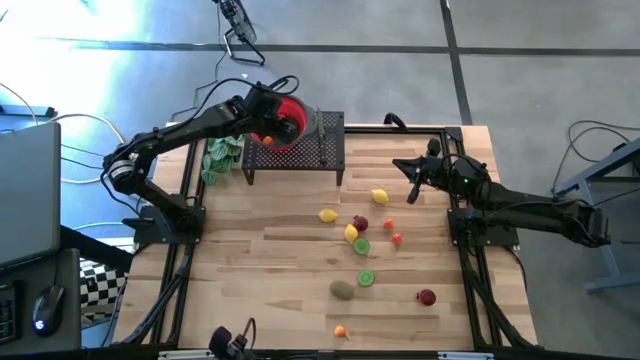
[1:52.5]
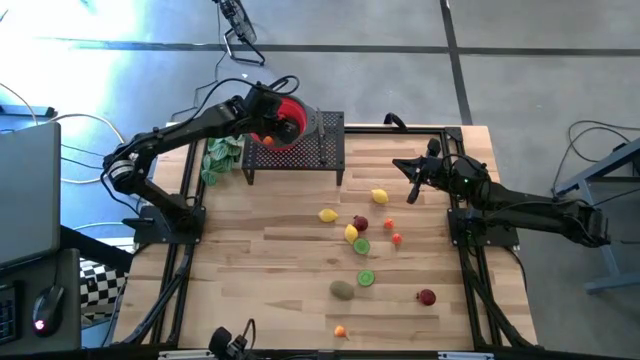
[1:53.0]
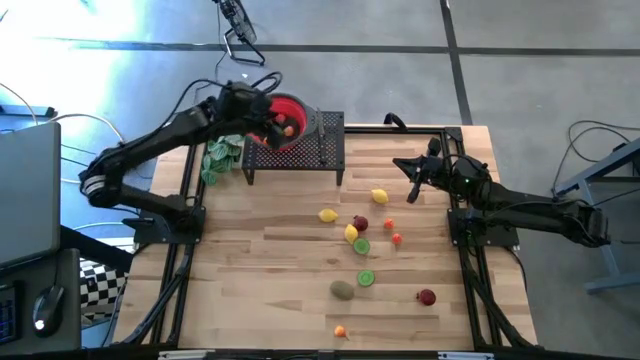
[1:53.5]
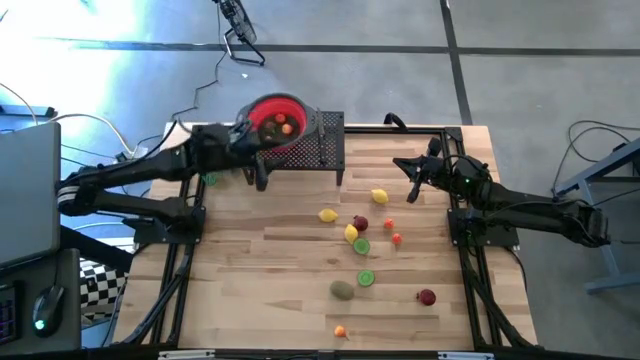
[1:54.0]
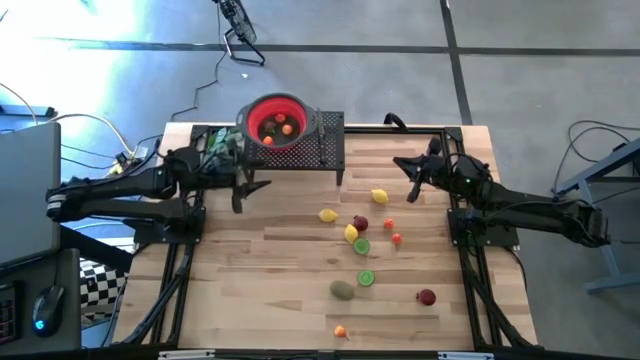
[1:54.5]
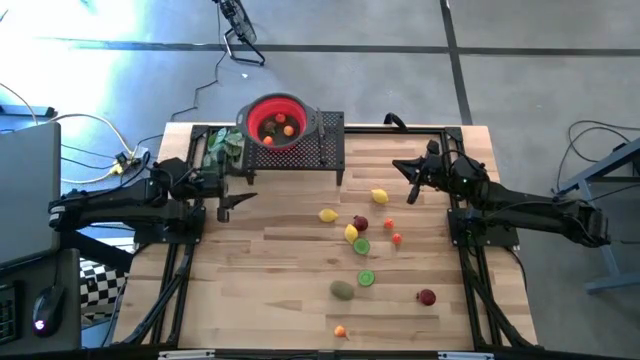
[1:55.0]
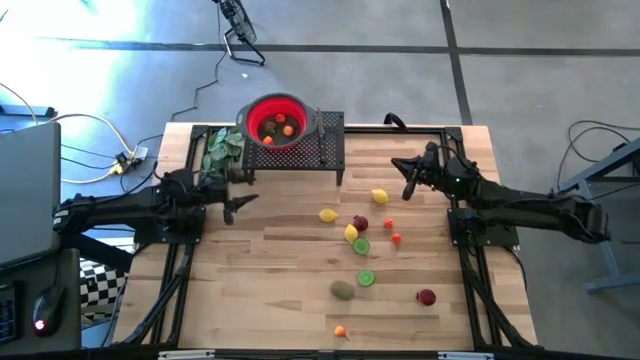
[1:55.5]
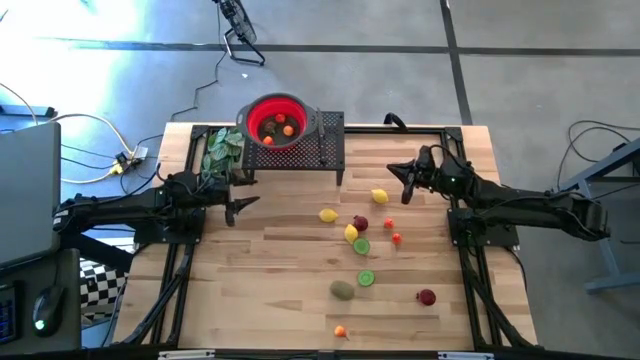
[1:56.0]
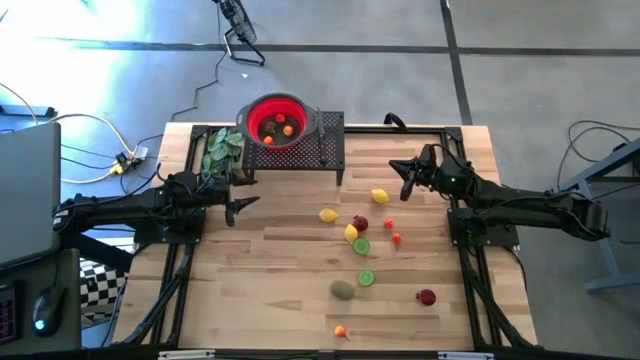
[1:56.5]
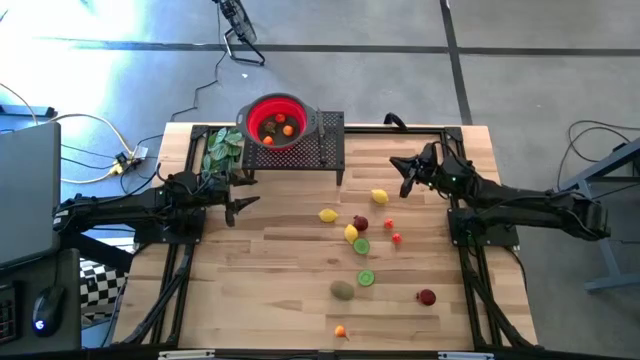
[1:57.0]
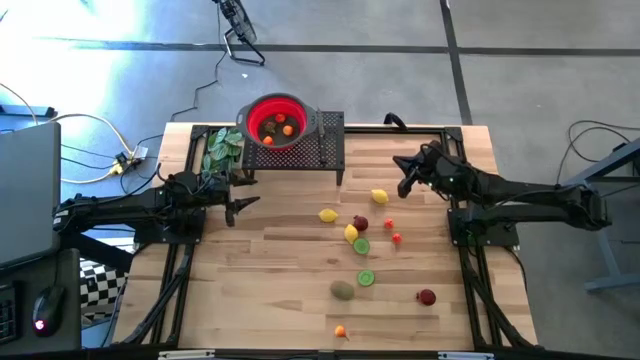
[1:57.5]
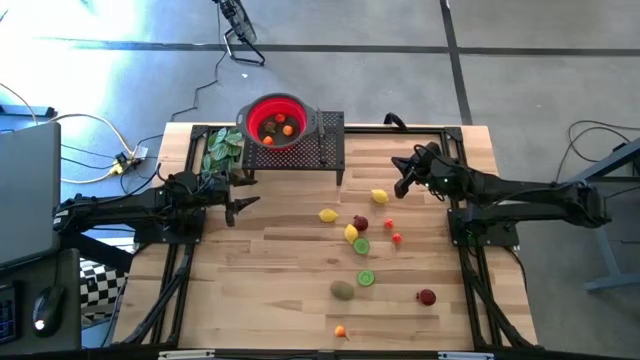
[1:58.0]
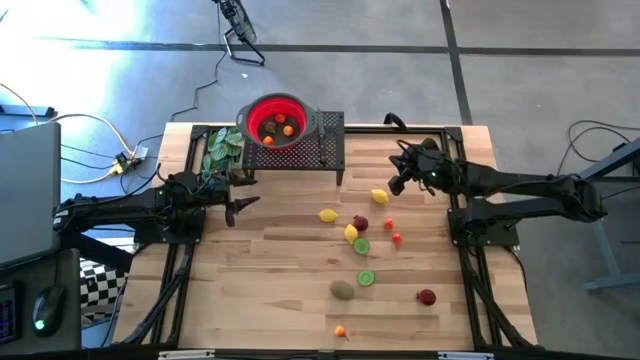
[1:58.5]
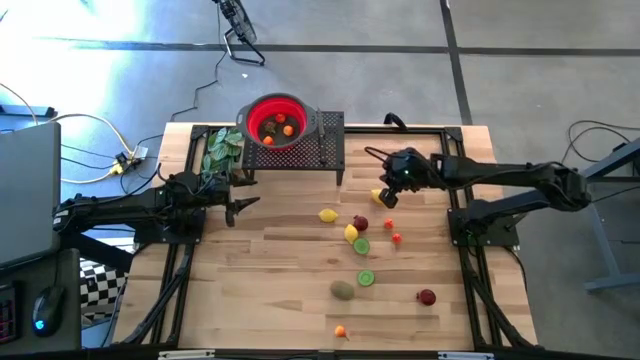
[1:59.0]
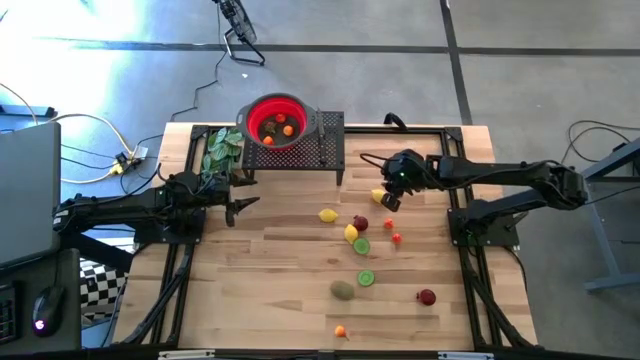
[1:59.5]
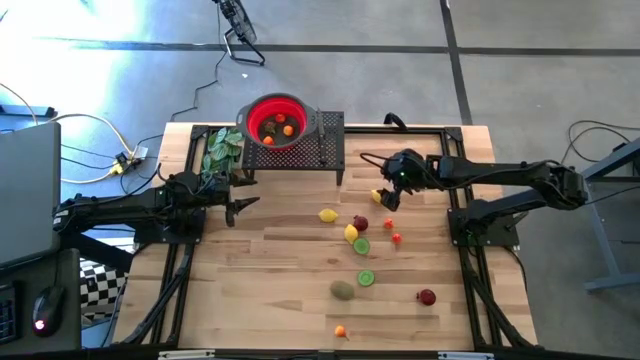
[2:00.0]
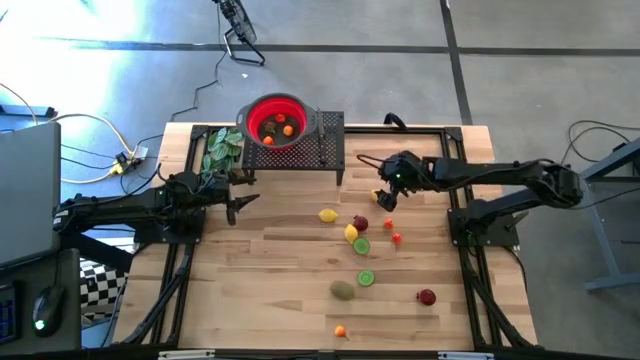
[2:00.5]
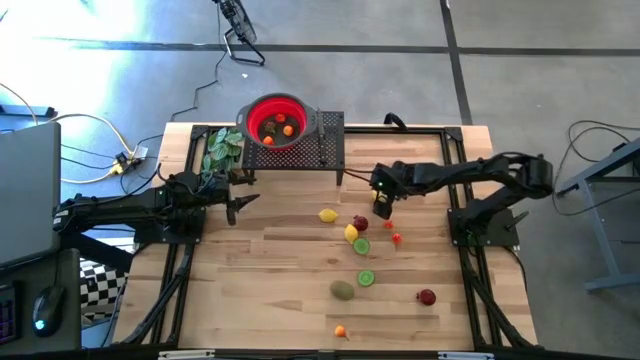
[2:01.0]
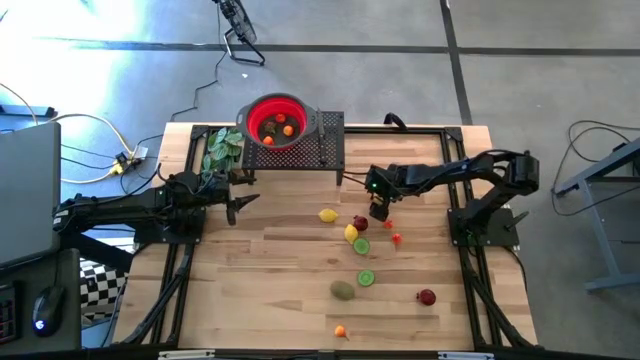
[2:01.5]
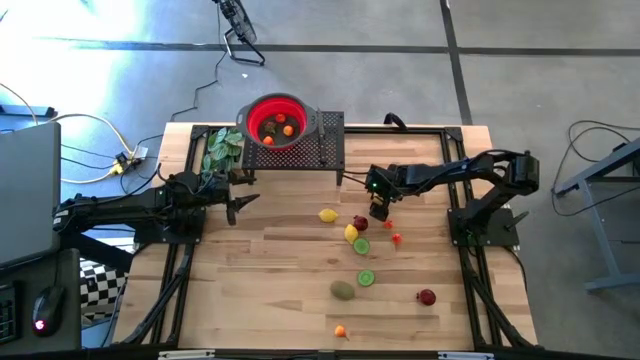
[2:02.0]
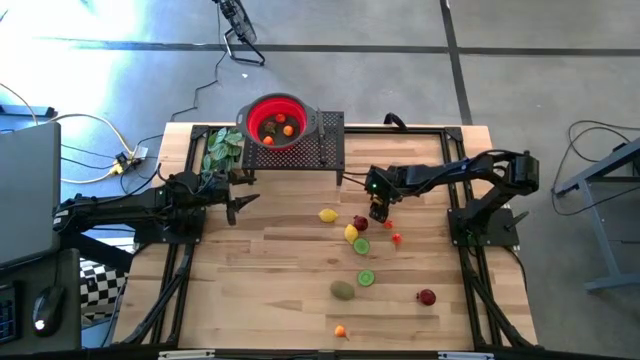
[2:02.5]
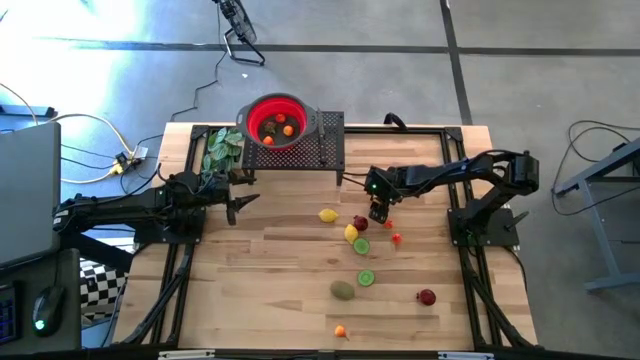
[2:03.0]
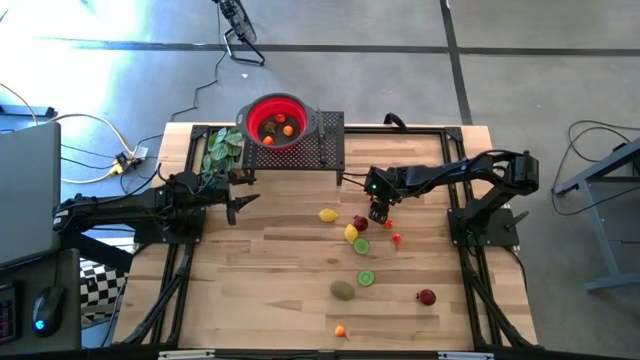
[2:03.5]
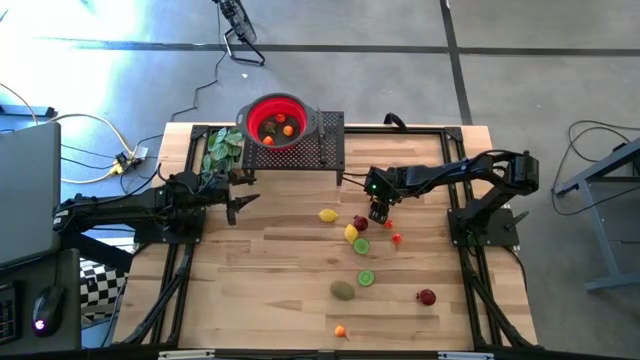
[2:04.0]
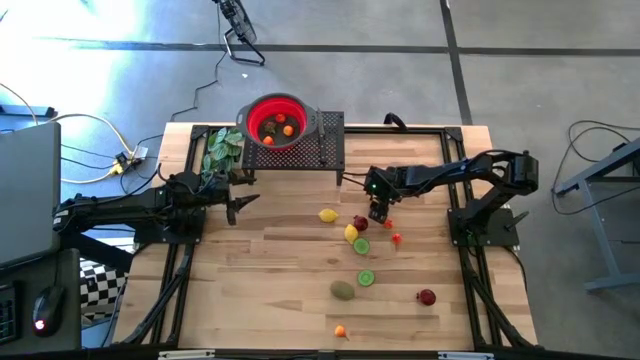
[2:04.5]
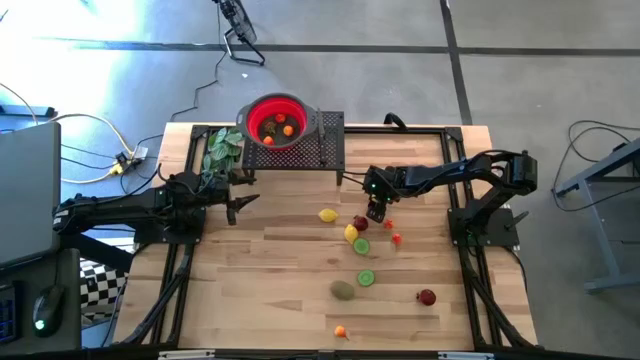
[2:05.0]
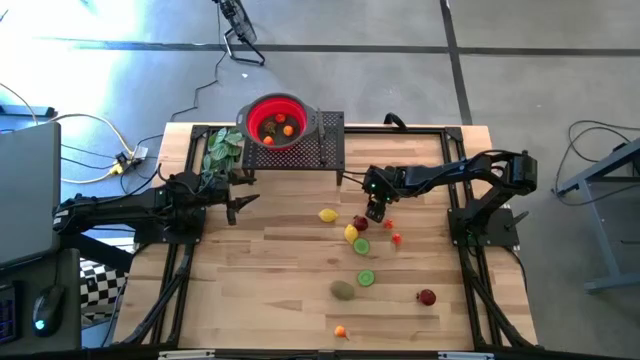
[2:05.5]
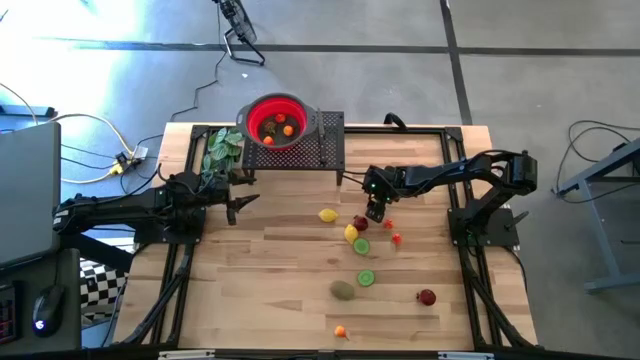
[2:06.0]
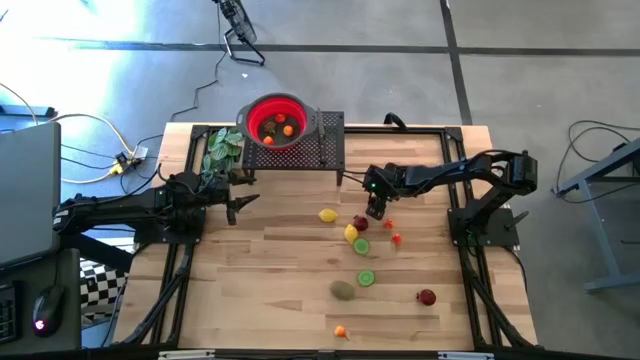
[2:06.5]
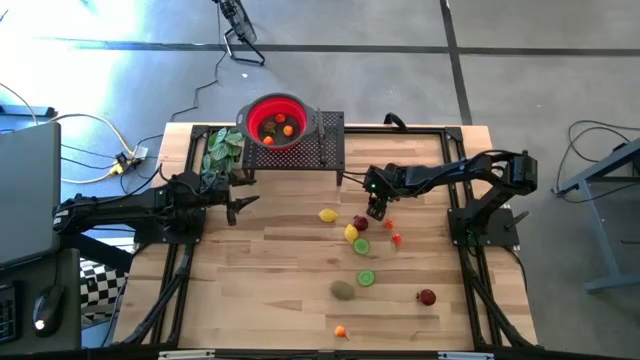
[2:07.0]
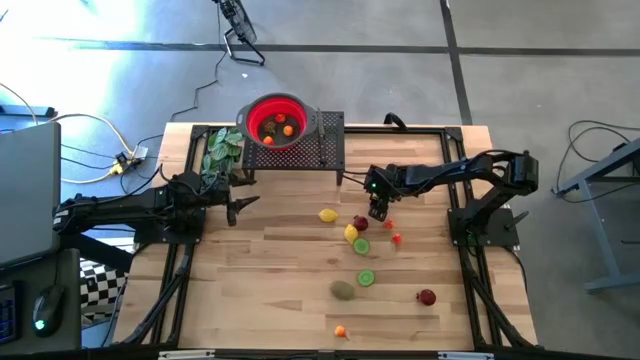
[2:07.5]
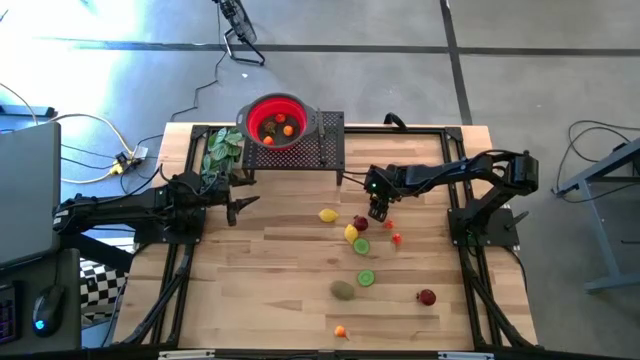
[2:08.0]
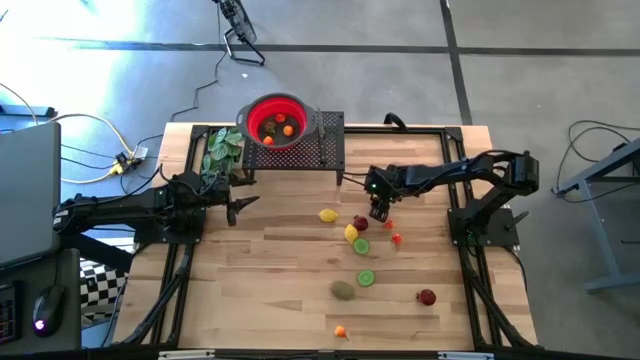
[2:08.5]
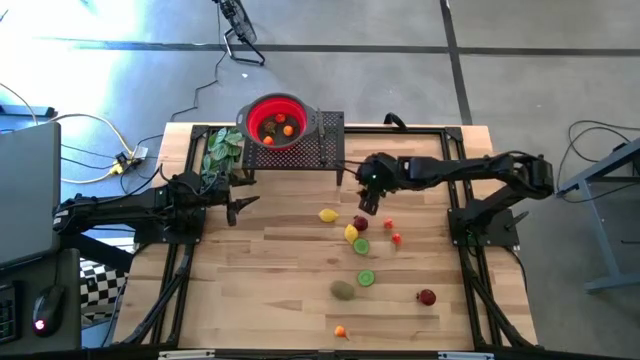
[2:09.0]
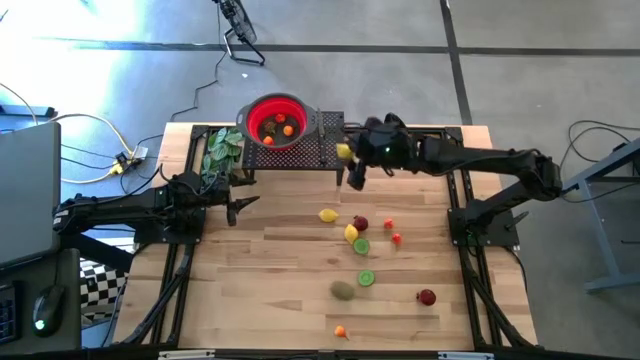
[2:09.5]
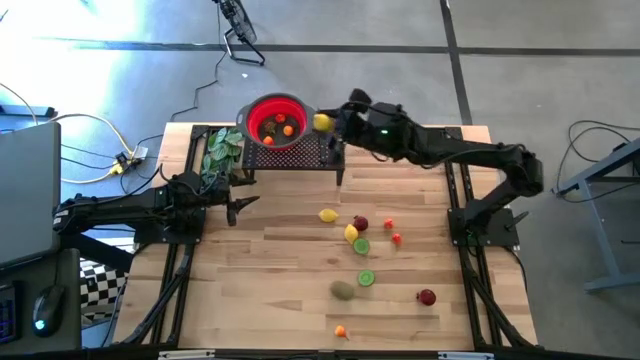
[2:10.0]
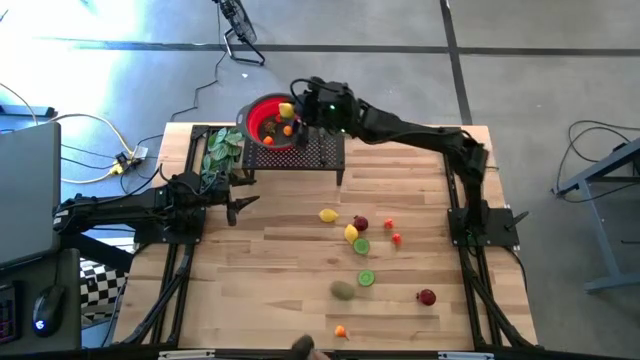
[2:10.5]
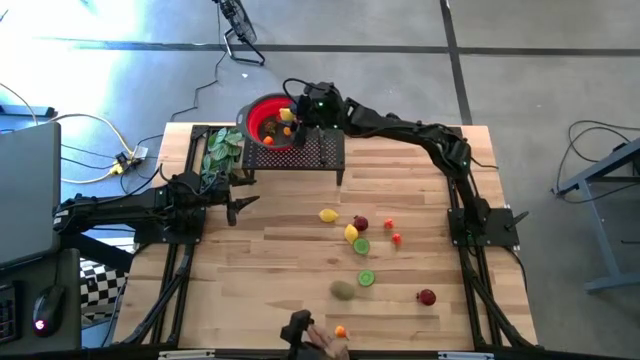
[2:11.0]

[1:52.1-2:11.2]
Task: Pick & Place Fruit
Put the yellow lemon into the red strainer bowl on the shelf

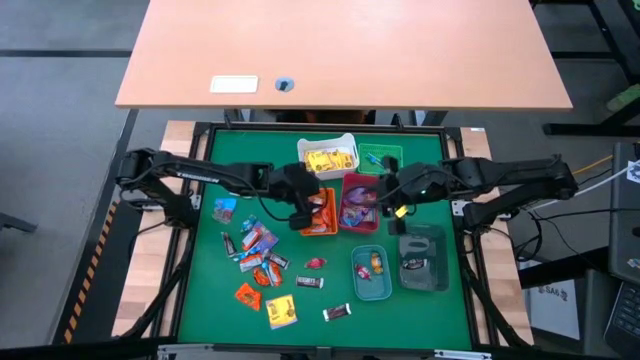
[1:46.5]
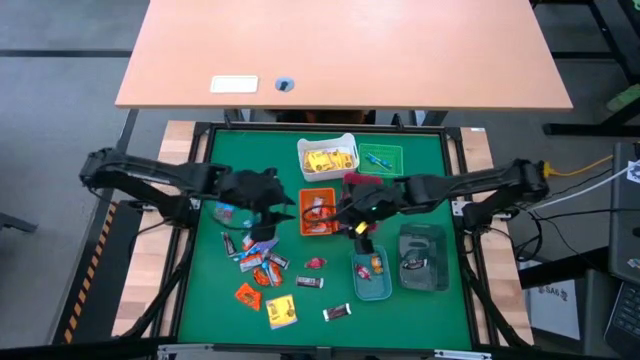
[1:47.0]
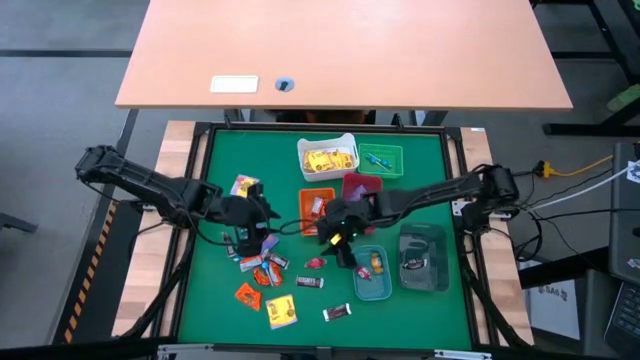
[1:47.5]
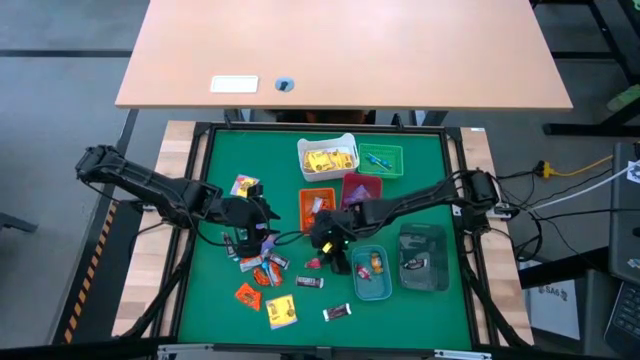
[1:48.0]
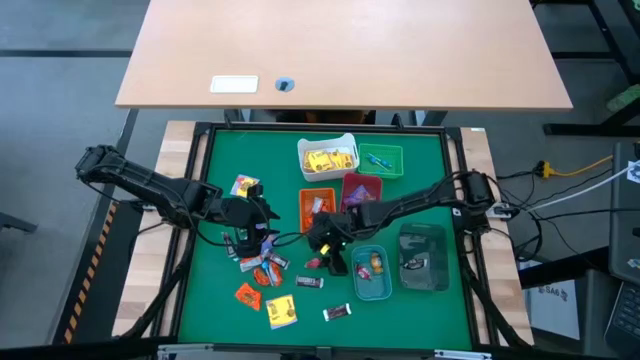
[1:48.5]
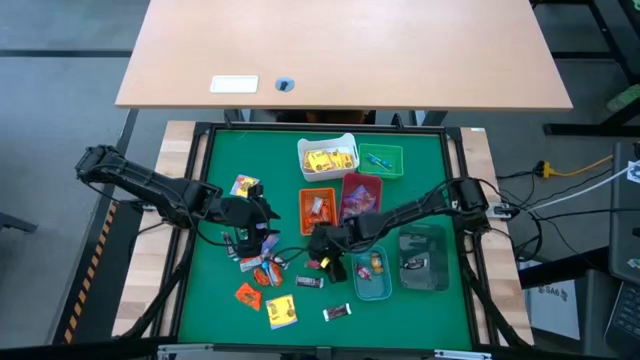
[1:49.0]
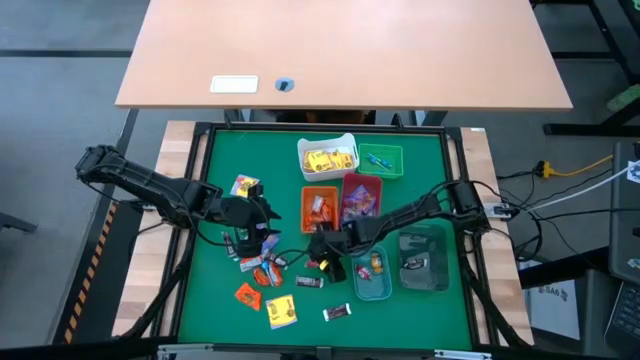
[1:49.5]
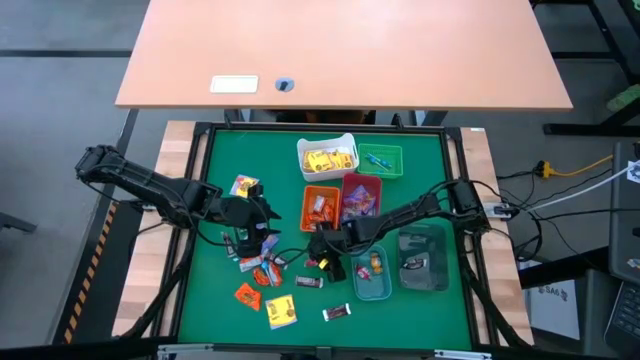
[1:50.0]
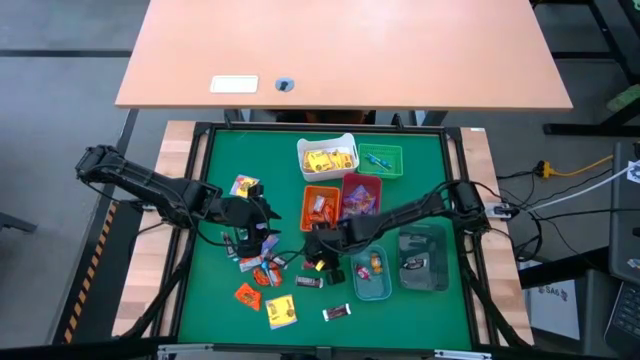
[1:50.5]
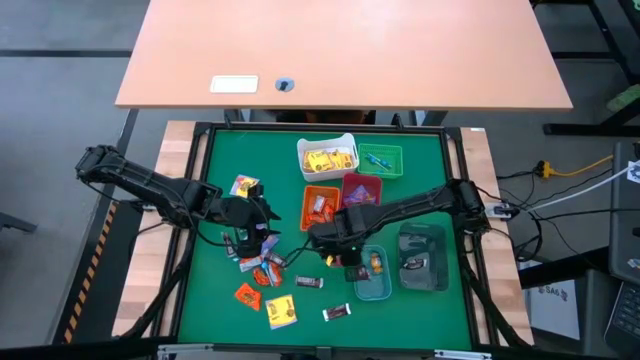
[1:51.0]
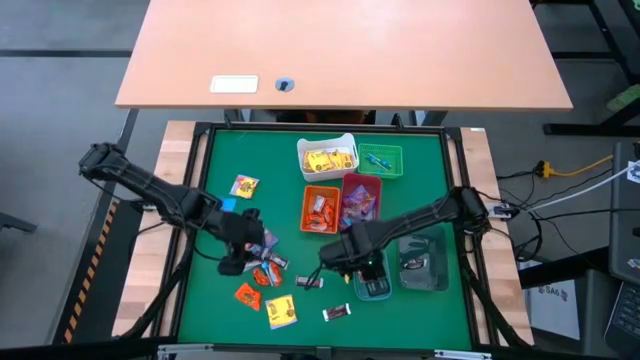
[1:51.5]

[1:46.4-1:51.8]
Task: Sort candy
Put the red candy into the blue bin
